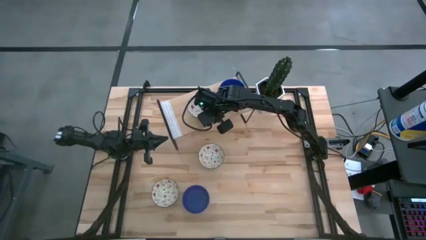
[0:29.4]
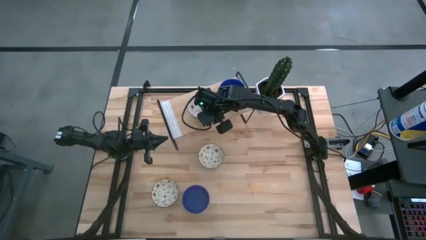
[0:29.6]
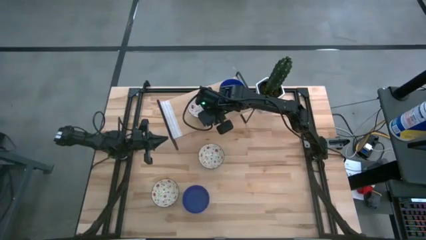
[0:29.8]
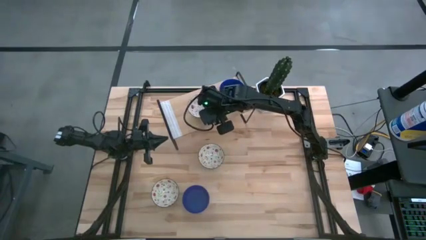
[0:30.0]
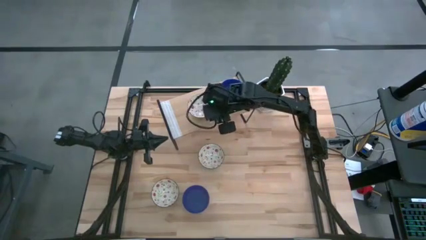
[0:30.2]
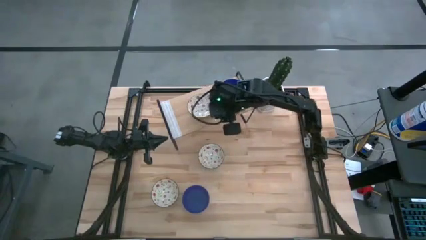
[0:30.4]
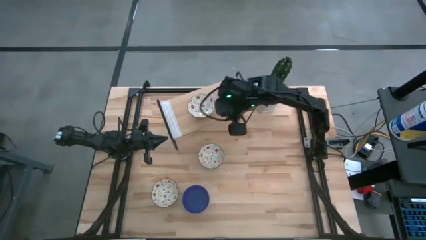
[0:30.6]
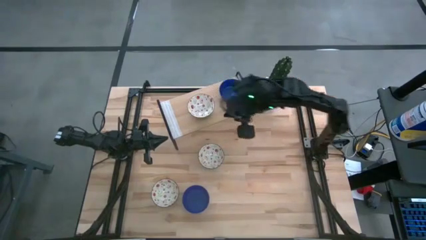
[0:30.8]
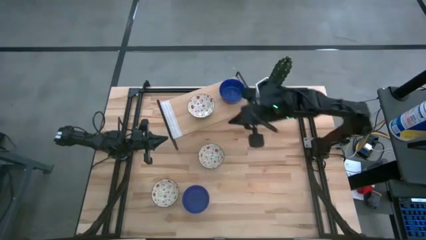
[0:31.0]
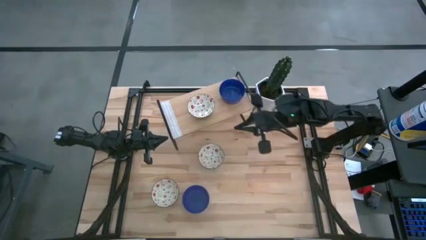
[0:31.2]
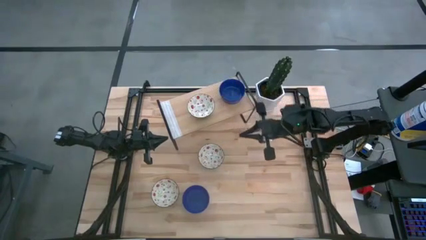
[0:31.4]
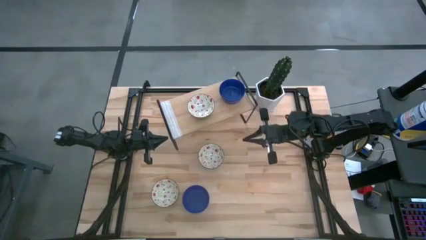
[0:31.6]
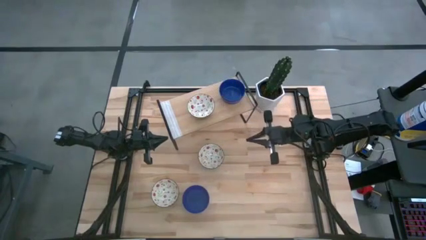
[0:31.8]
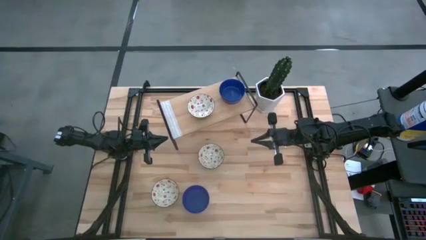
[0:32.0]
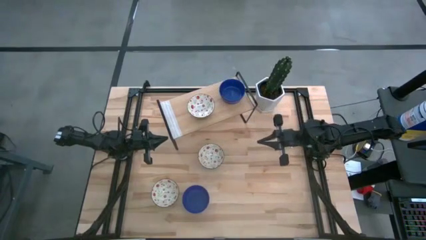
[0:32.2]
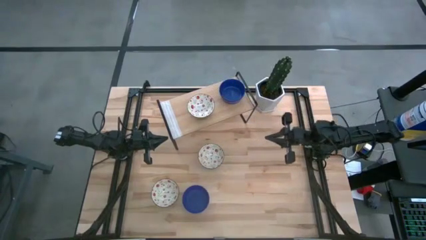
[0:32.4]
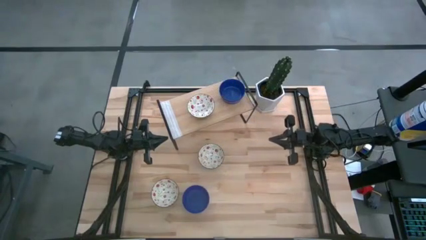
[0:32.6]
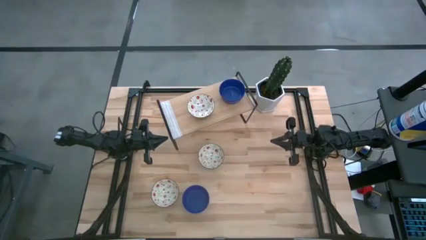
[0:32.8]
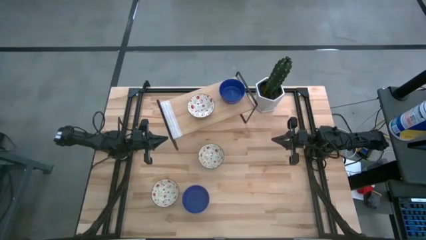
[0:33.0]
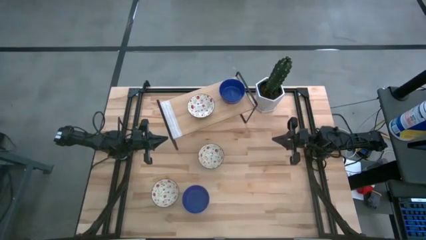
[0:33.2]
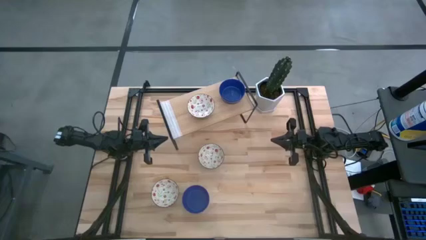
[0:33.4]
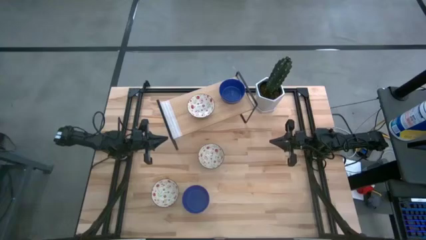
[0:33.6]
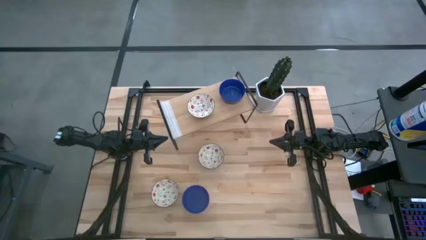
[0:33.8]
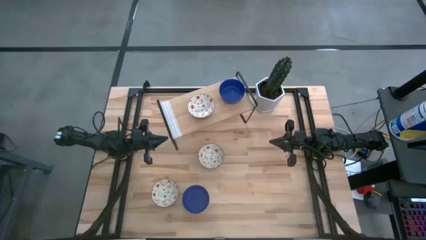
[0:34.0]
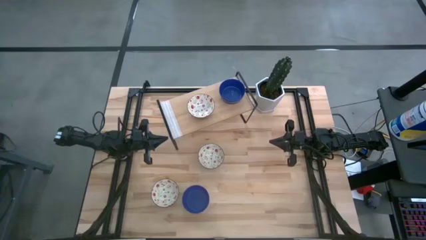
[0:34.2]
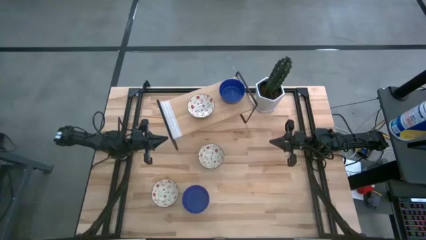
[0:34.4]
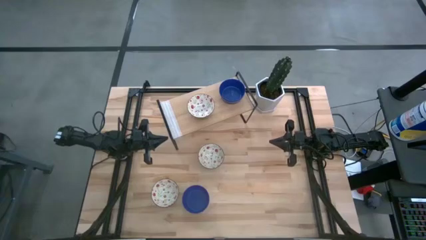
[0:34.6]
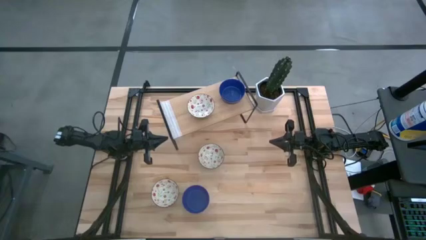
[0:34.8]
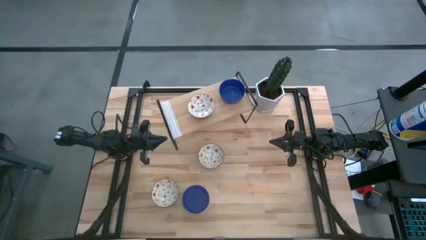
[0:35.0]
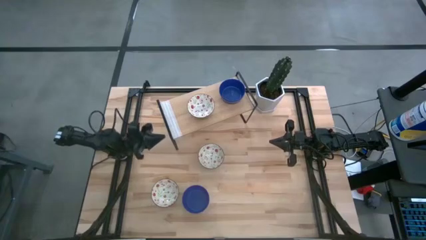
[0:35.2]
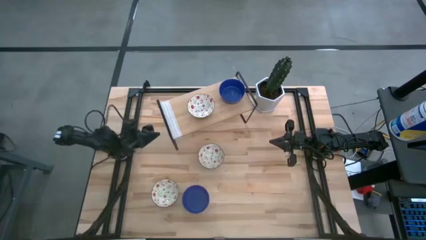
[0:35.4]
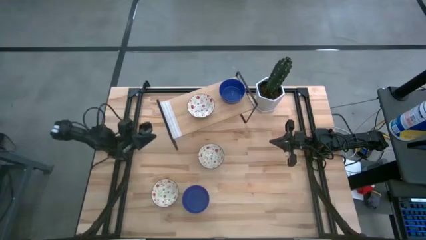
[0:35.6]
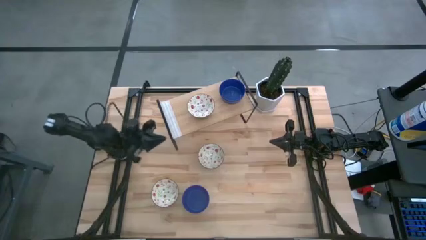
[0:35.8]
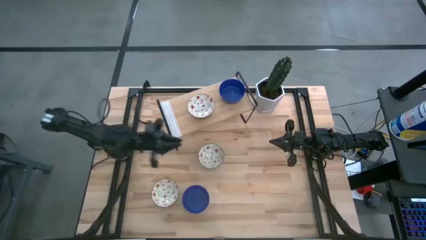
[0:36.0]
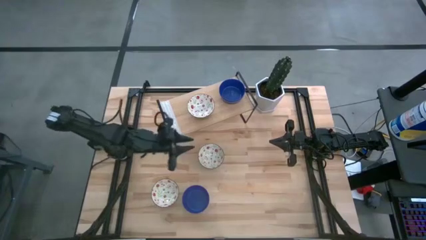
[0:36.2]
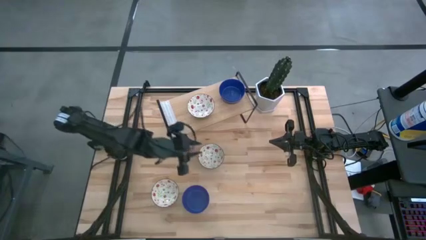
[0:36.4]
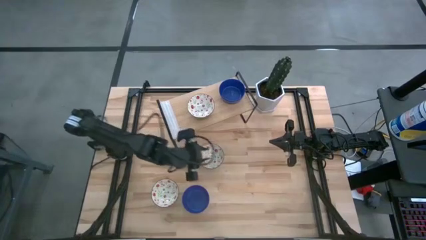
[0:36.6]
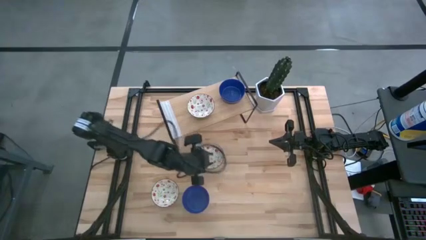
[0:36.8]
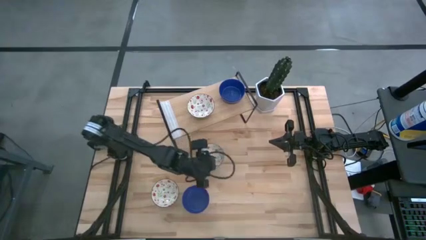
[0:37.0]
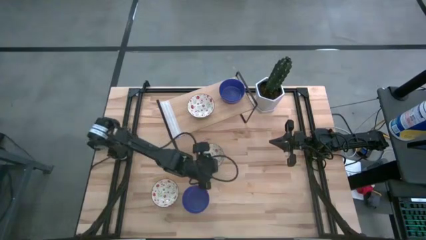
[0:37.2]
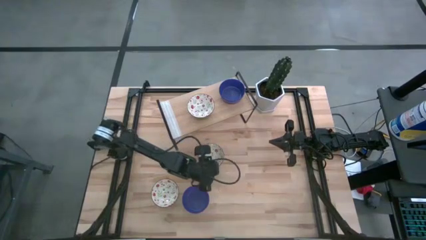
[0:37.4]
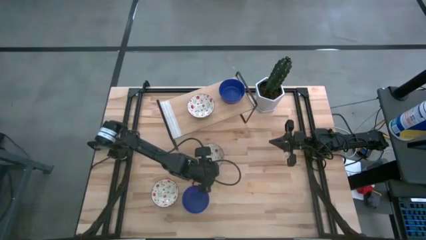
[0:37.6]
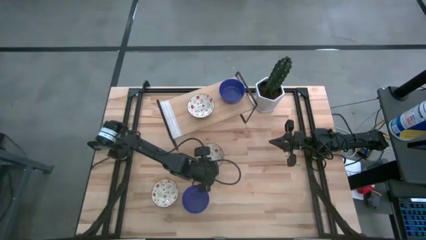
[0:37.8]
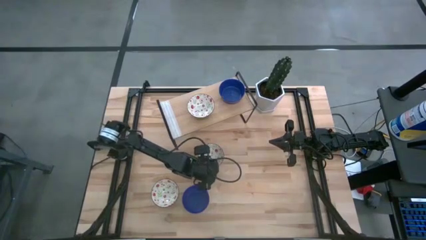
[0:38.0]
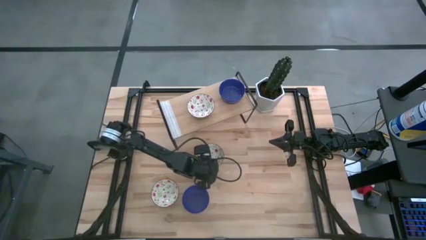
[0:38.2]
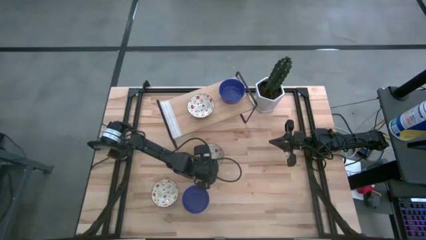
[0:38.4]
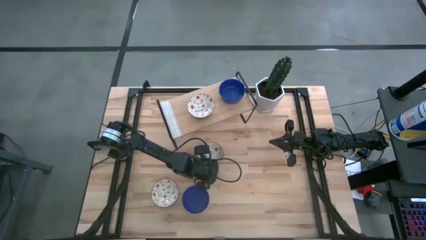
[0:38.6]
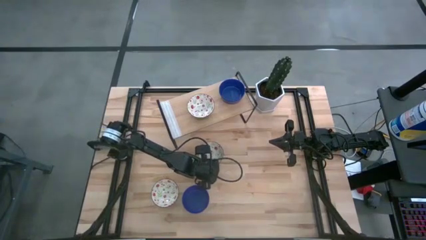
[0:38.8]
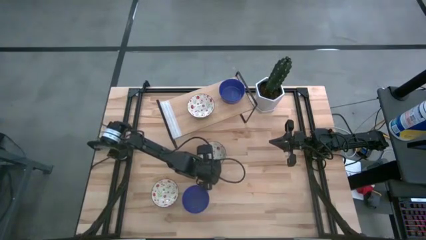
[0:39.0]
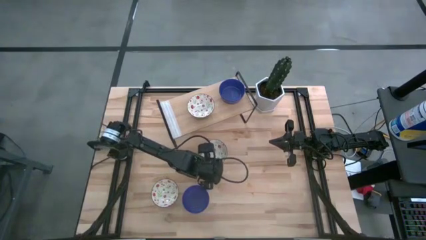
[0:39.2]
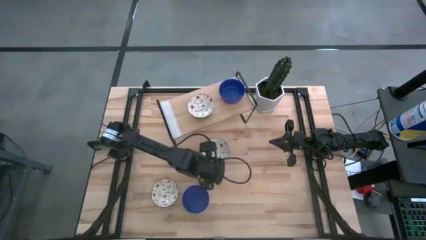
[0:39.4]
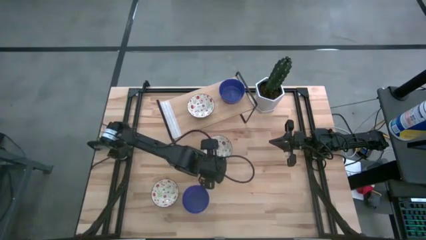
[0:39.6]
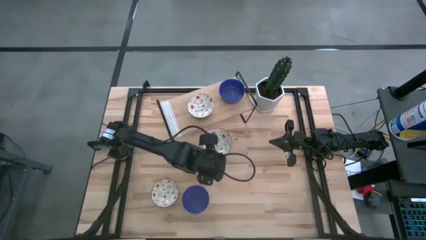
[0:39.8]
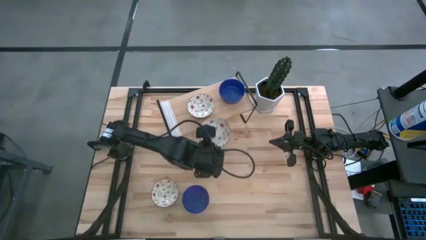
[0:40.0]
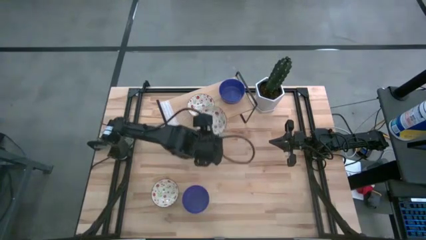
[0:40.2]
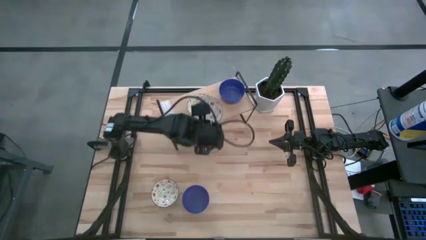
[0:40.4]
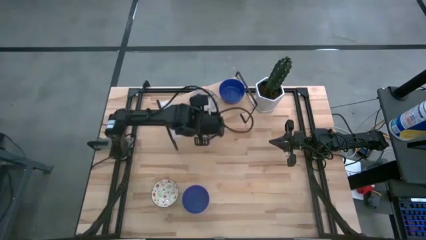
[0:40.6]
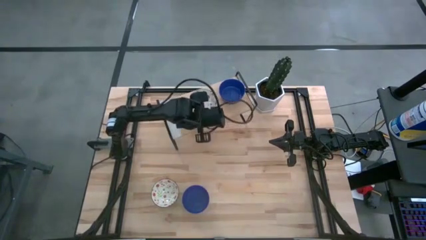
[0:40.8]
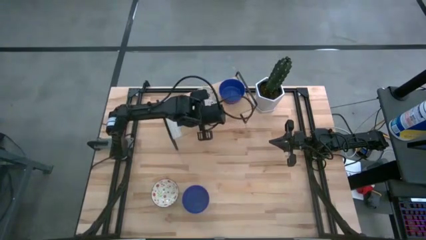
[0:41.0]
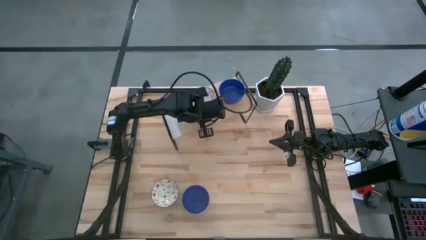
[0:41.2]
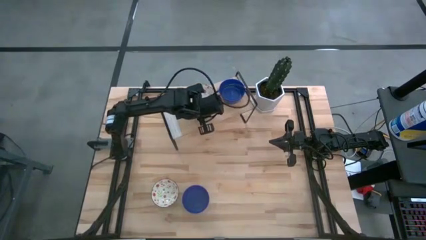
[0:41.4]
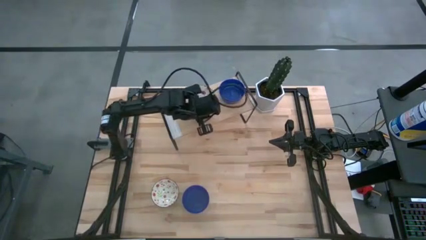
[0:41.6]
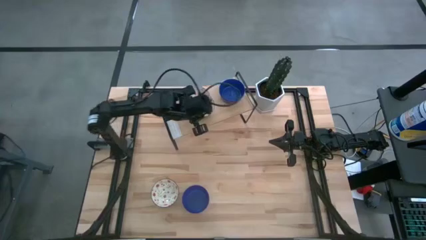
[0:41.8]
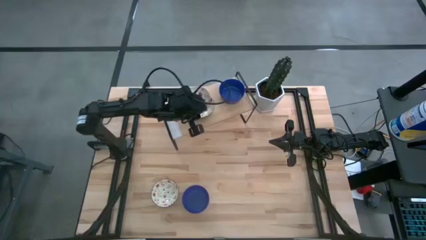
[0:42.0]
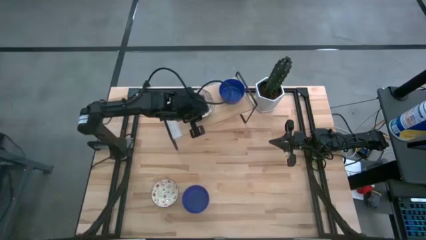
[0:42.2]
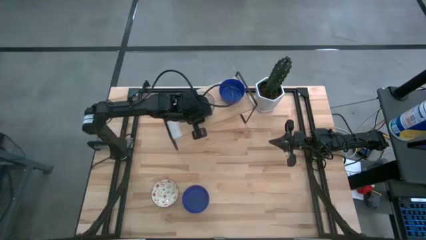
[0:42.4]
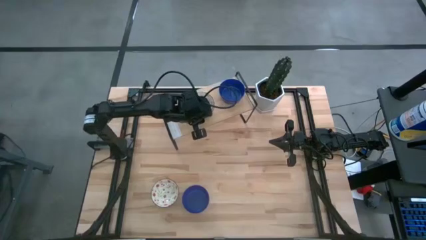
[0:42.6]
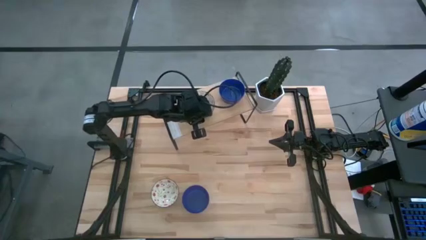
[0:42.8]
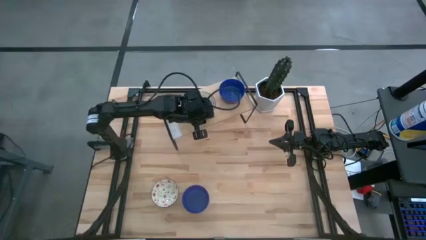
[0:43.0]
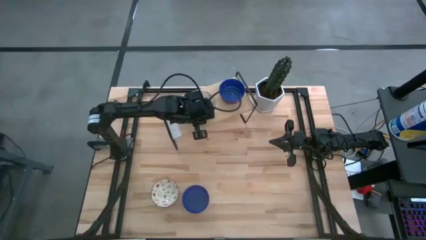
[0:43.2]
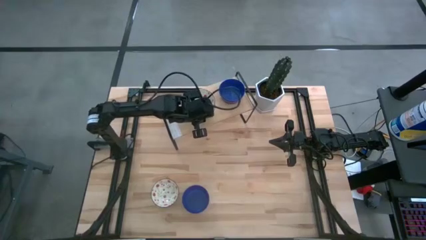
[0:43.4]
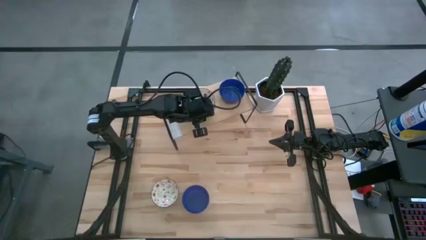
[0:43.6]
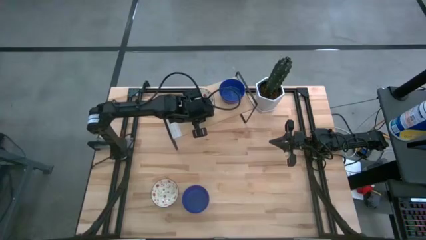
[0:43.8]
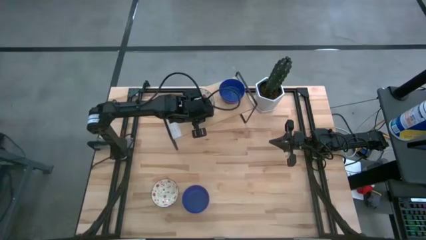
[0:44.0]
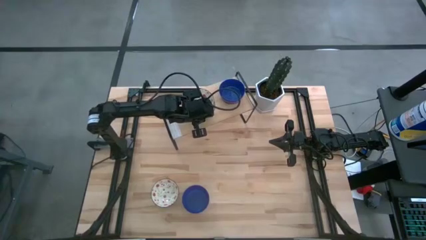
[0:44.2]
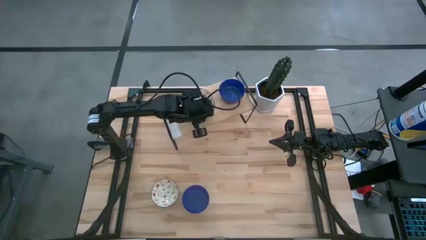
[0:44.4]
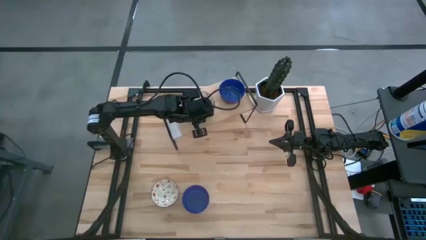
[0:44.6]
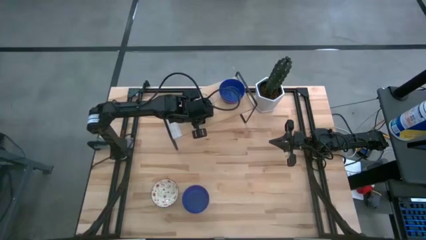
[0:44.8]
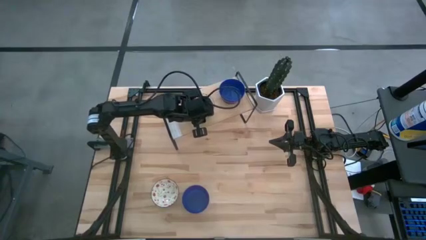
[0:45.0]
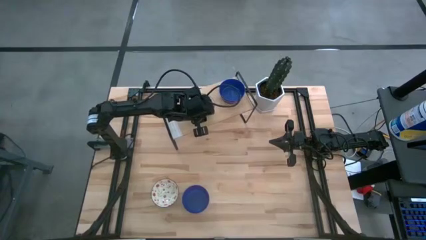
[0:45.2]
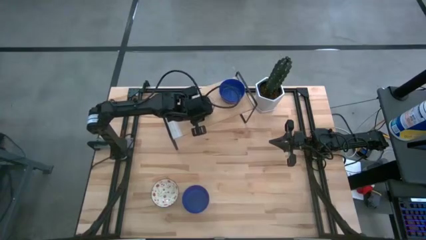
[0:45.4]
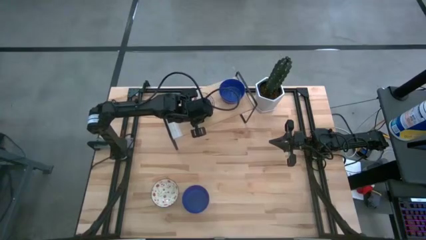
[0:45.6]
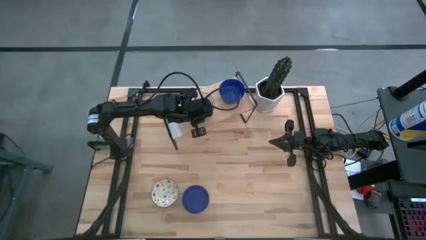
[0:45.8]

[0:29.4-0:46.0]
Task: Pick & Place Mini bowls
Stack the top white patterned bowl on top of the white patterned bowl on the shelf
